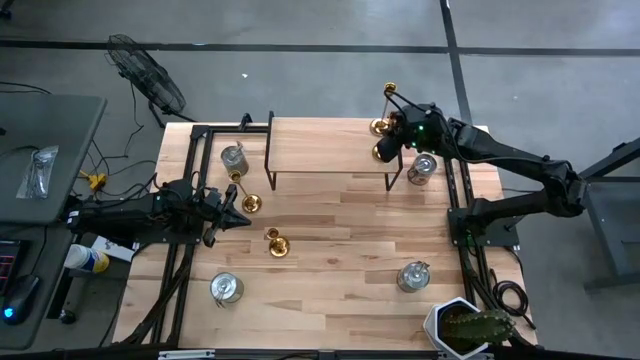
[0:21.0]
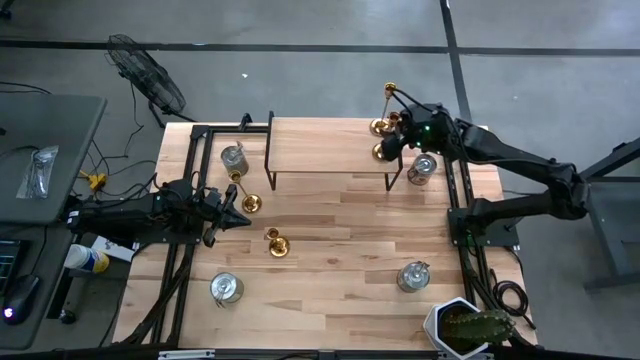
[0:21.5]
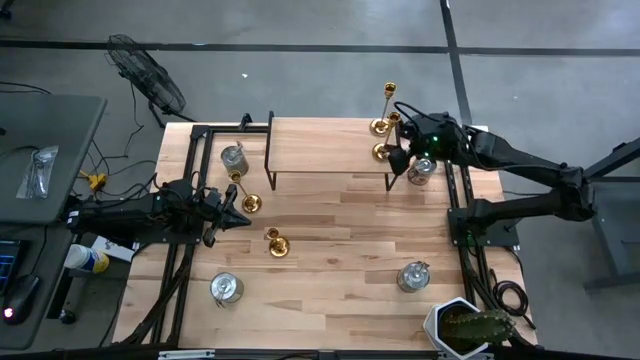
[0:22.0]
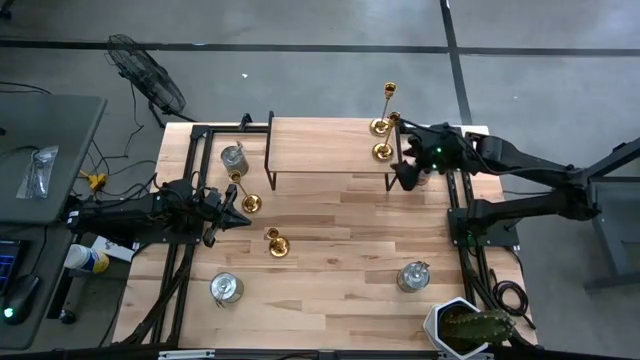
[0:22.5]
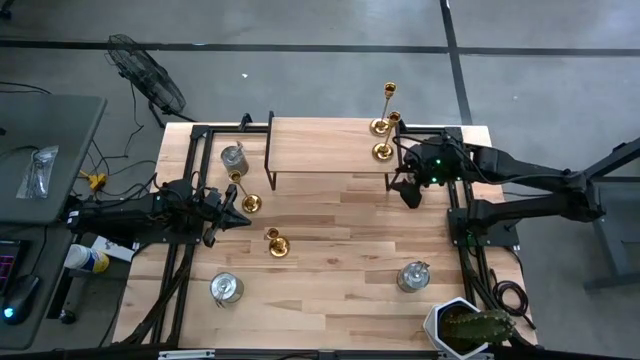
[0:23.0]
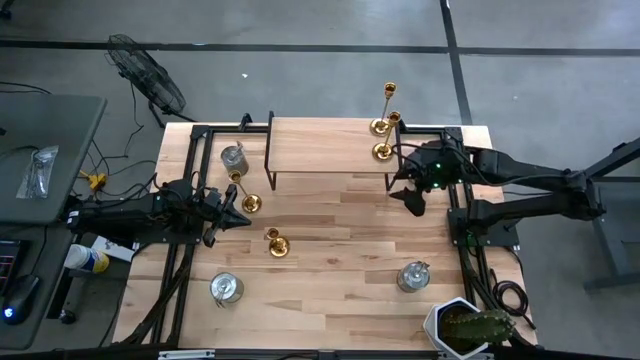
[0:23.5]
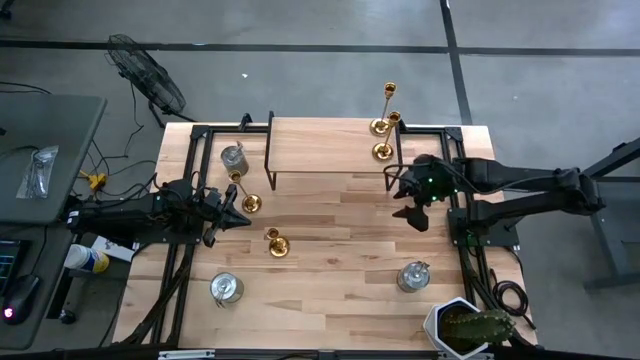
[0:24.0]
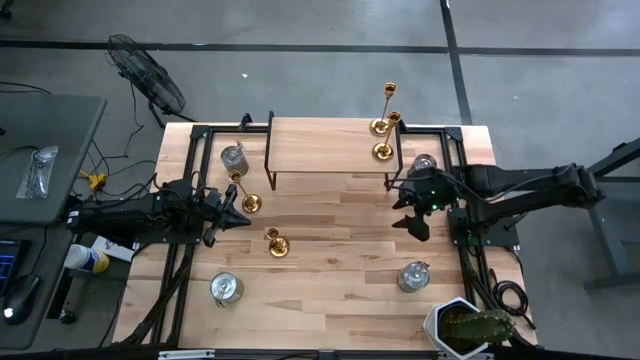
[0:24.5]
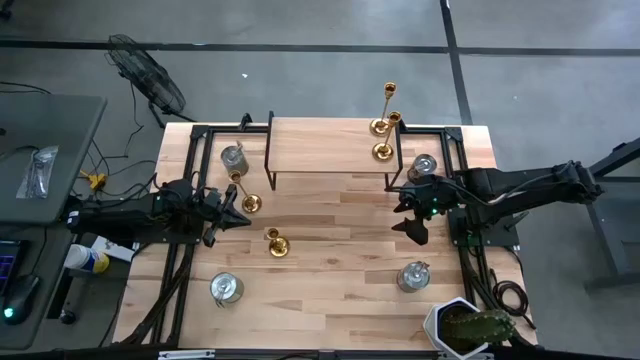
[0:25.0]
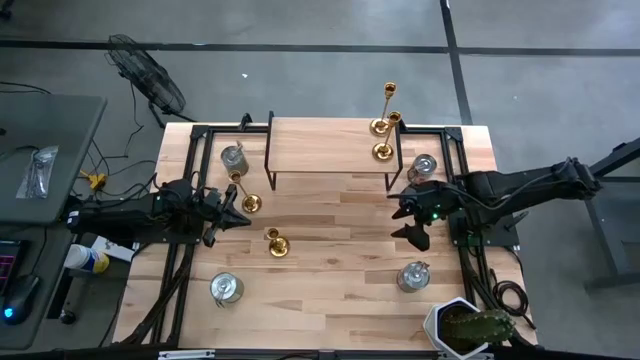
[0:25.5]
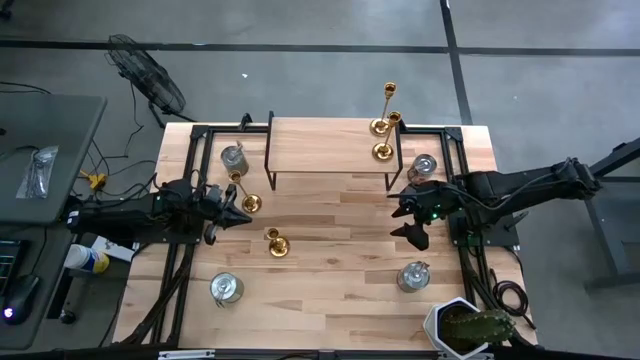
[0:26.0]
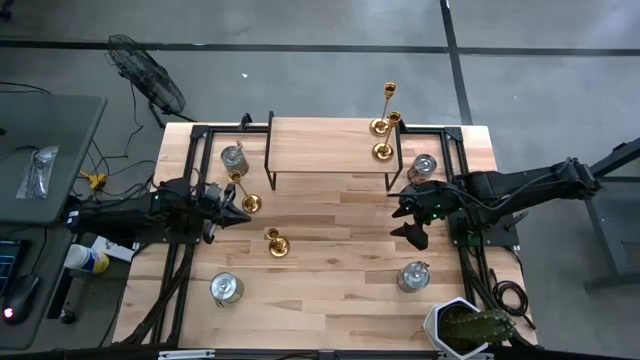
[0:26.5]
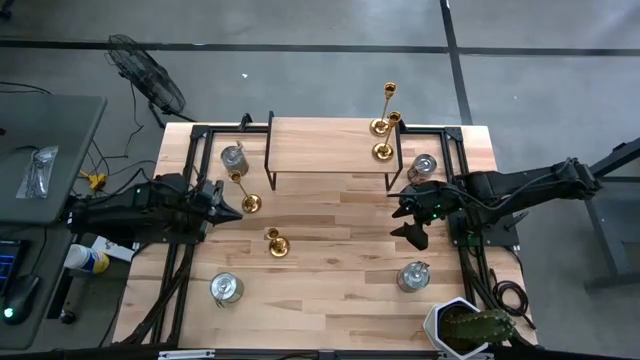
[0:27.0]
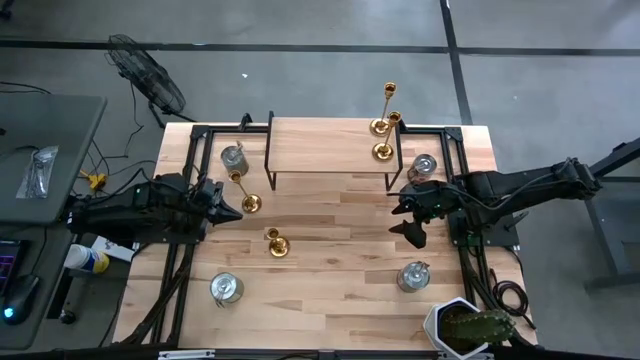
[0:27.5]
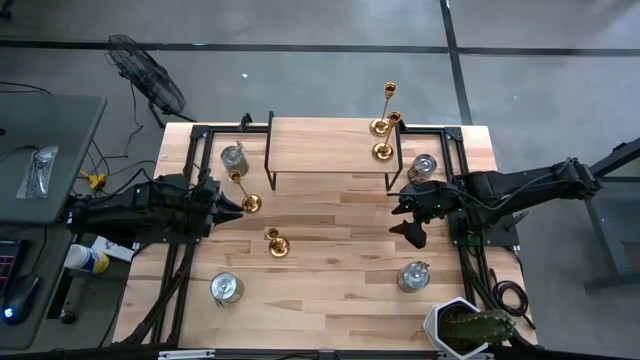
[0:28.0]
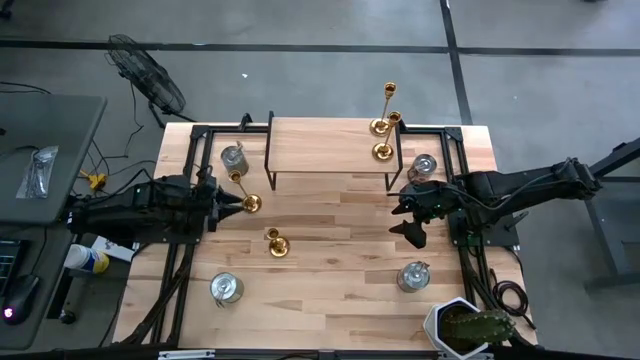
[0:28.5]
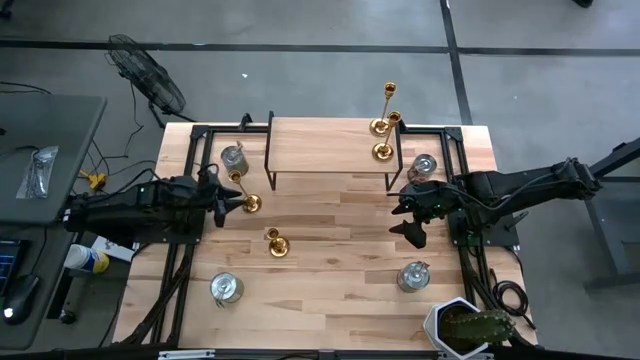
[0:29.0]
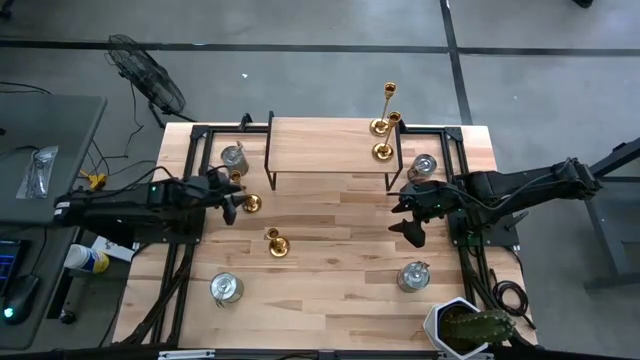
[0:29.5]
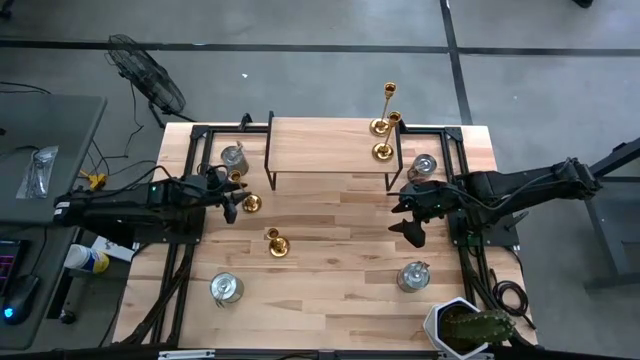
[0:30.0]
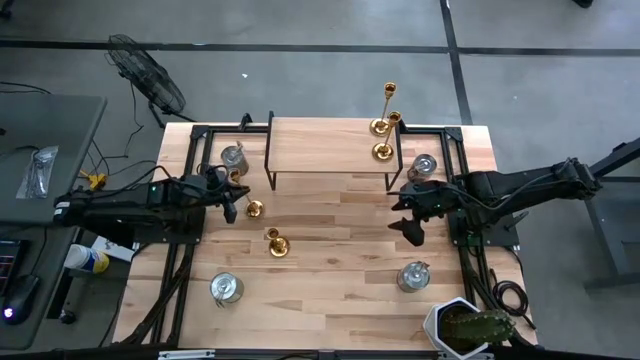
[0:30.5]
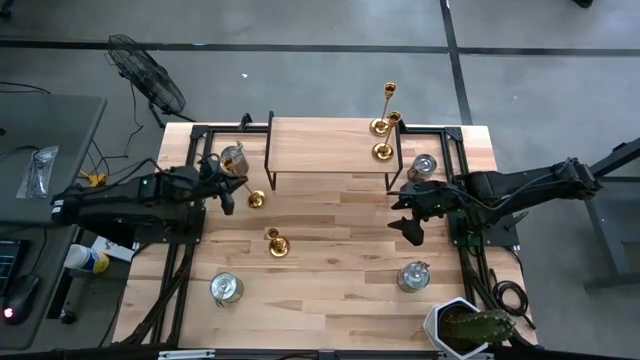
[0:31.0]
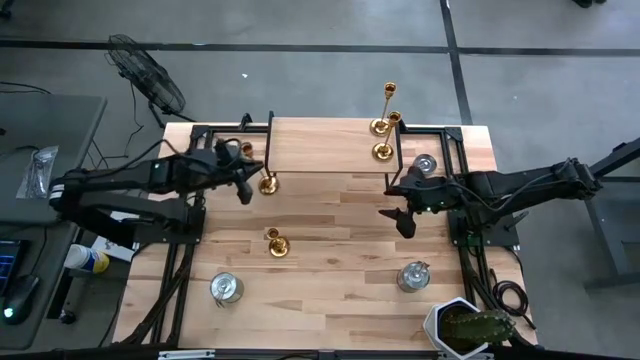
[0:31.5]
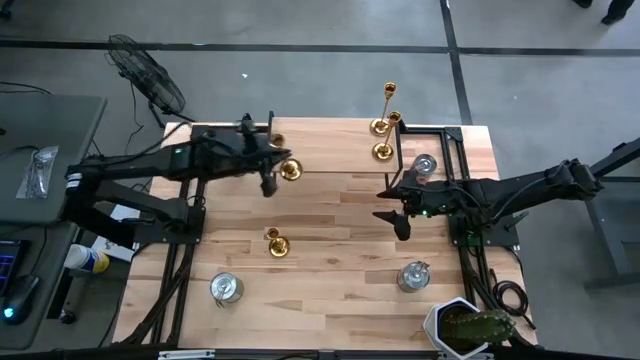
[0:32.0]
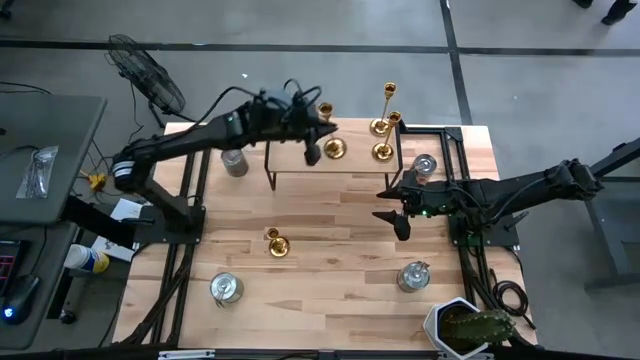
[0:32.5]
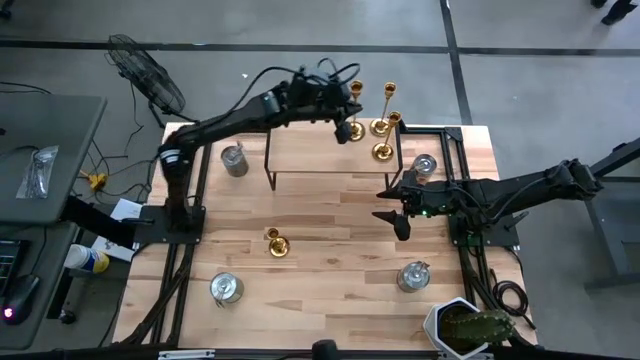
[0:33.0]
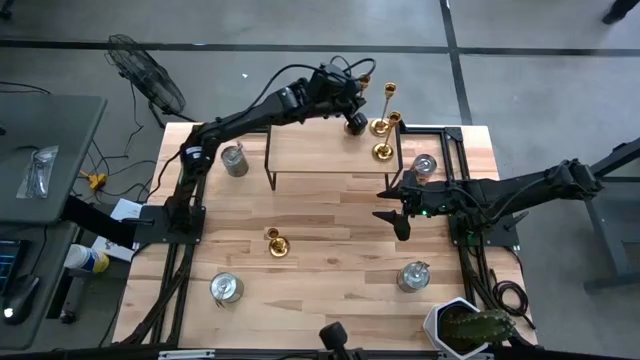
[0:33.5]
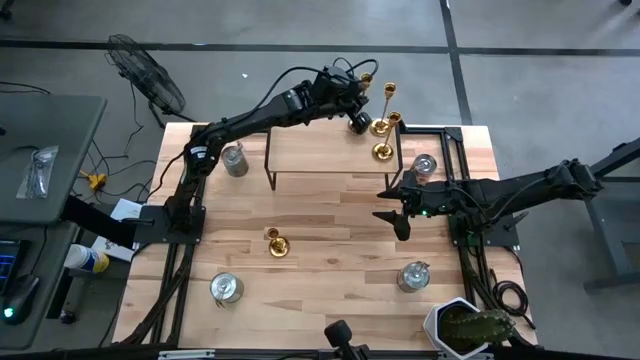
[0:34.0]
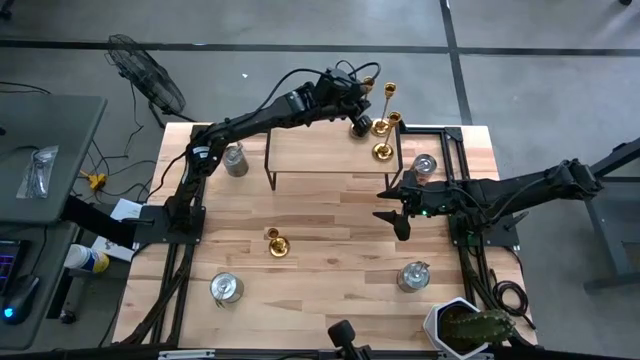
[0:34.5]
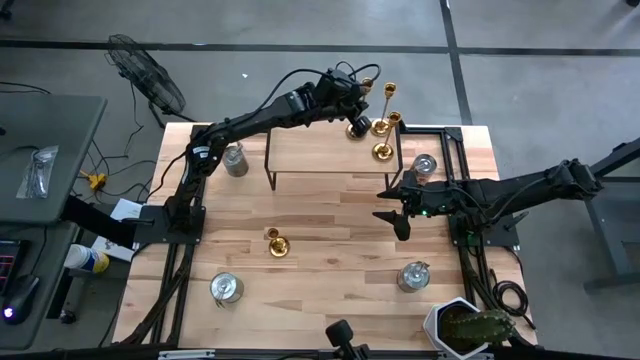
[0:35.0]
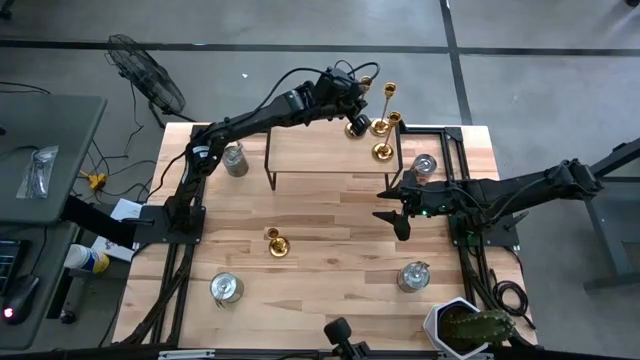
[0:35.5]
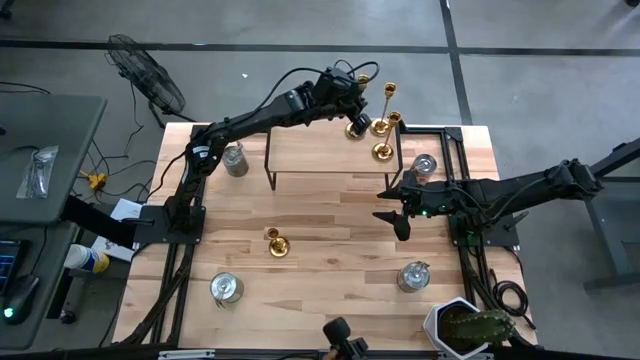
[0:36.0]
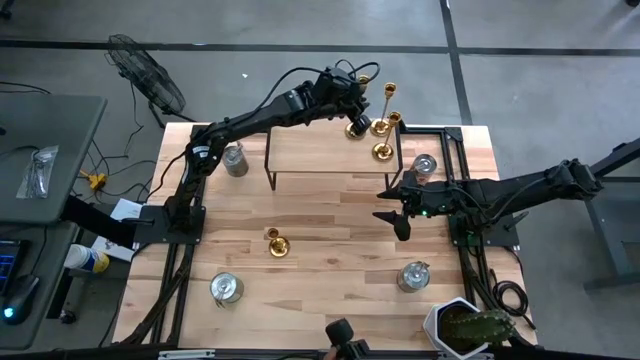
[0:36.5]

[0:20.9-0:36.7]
Task: Pick & Place candle stick holders
Put the gold candle holder on the shelf
